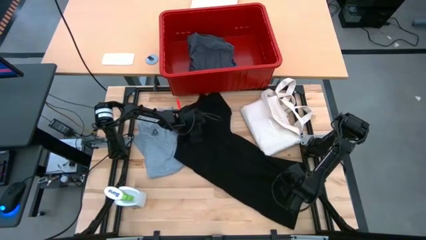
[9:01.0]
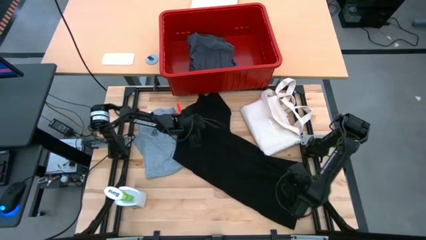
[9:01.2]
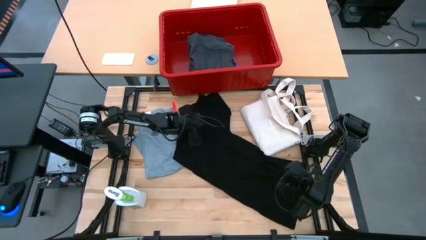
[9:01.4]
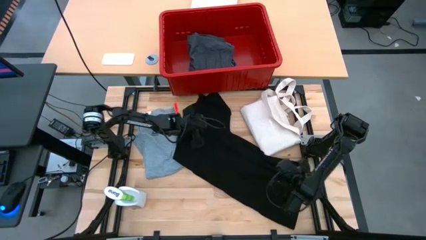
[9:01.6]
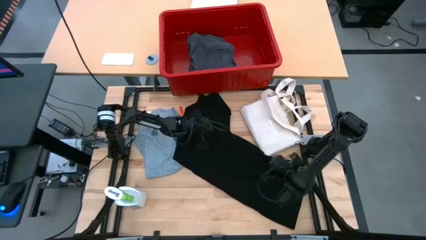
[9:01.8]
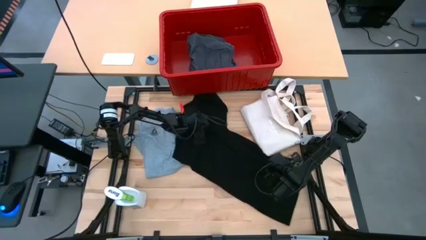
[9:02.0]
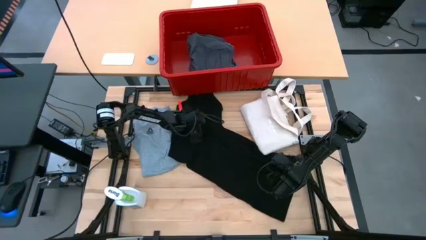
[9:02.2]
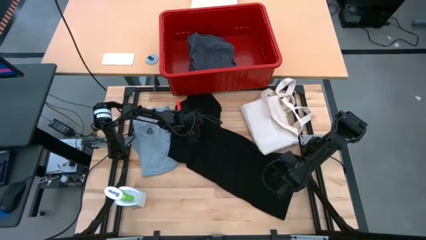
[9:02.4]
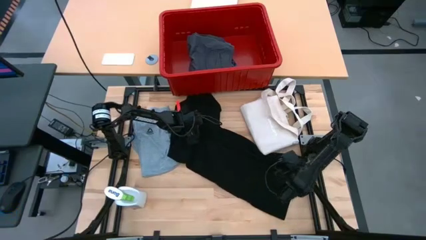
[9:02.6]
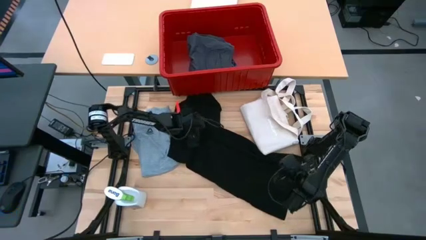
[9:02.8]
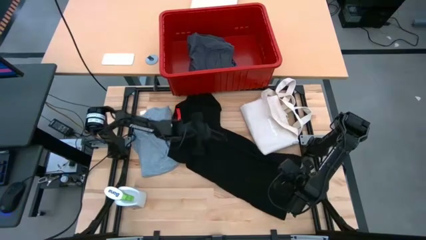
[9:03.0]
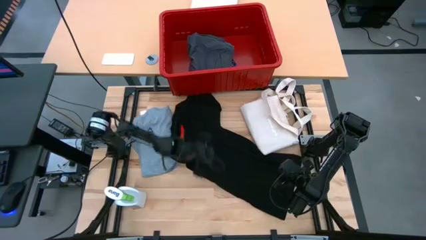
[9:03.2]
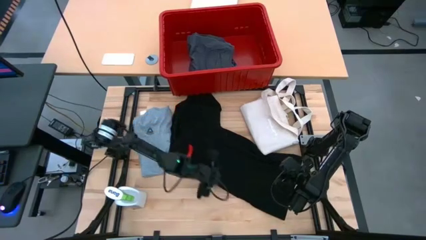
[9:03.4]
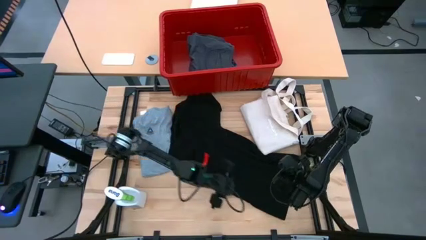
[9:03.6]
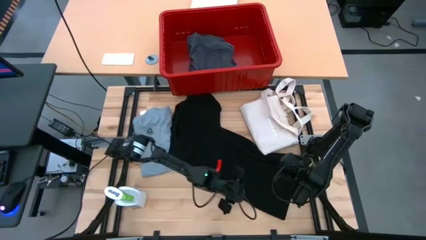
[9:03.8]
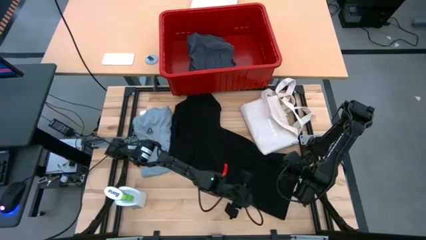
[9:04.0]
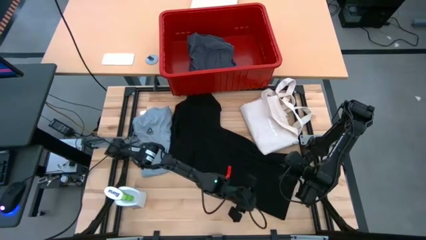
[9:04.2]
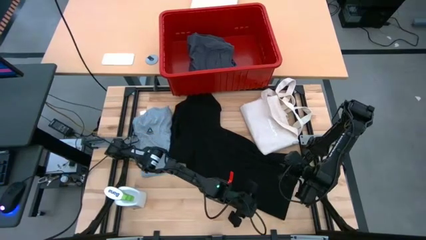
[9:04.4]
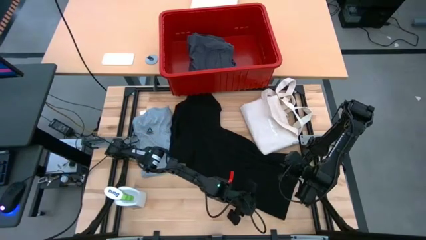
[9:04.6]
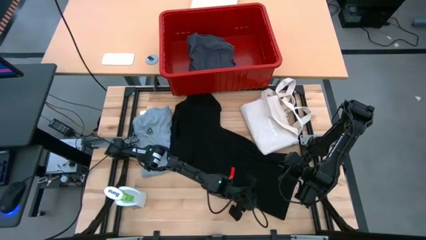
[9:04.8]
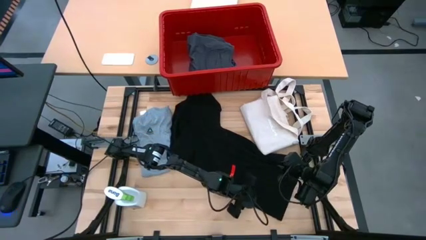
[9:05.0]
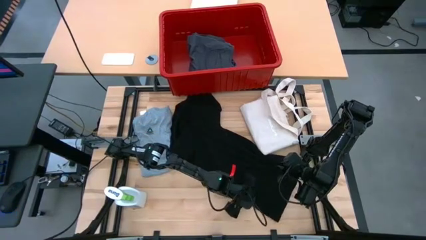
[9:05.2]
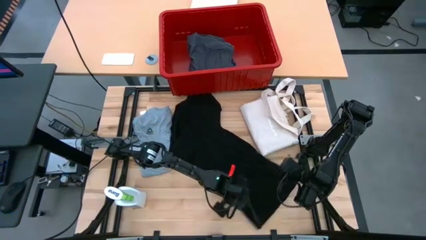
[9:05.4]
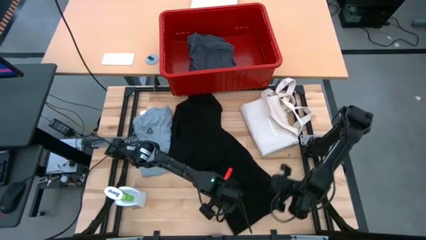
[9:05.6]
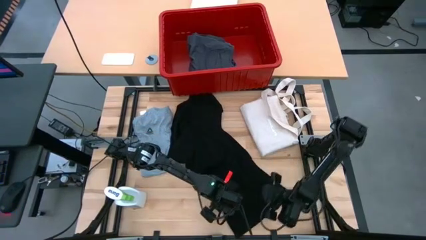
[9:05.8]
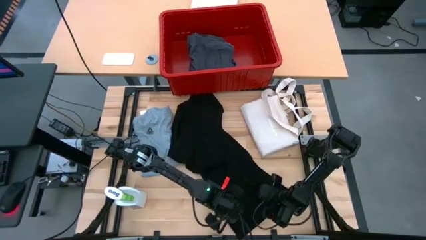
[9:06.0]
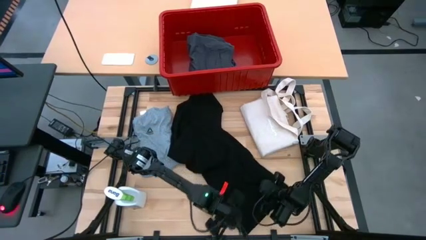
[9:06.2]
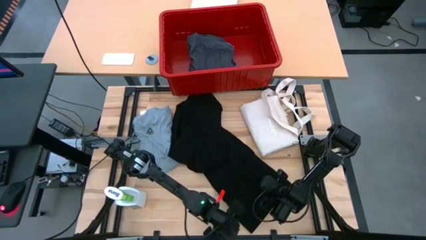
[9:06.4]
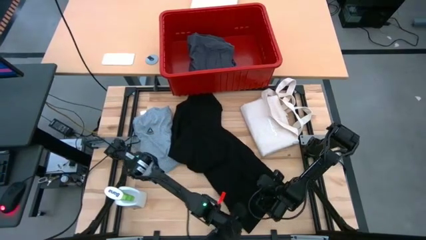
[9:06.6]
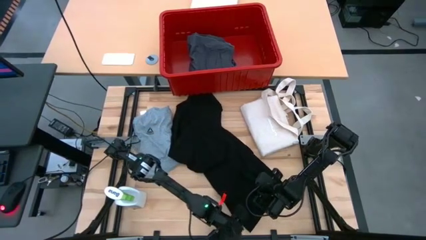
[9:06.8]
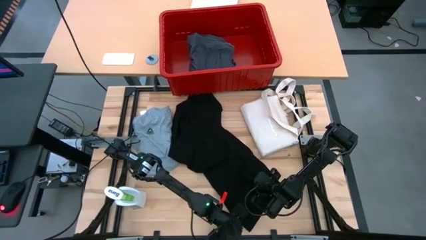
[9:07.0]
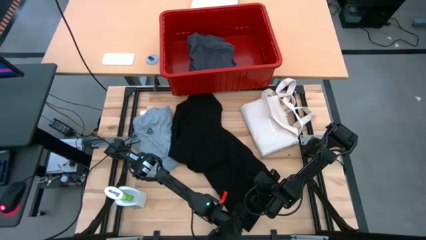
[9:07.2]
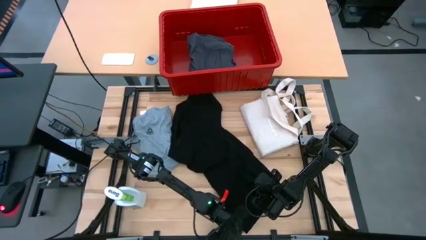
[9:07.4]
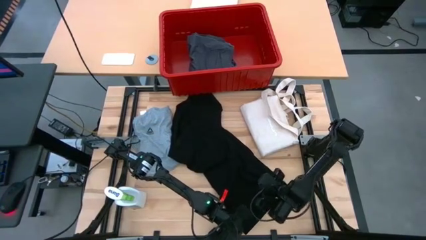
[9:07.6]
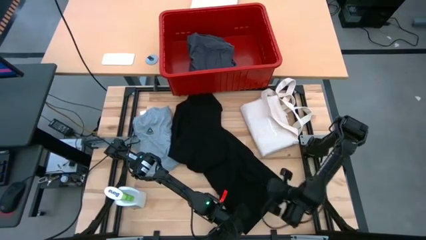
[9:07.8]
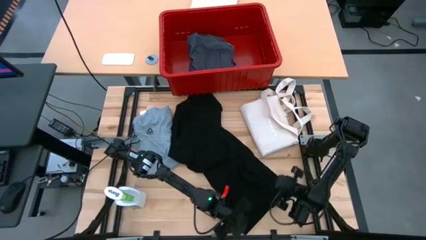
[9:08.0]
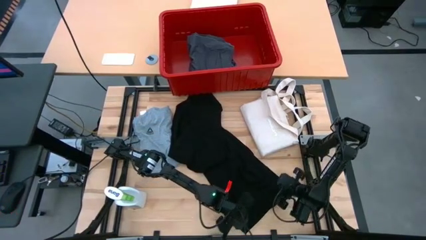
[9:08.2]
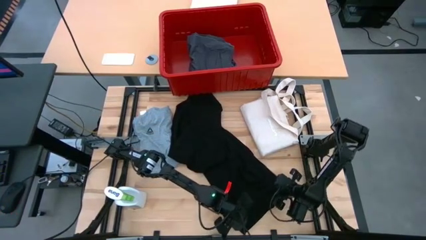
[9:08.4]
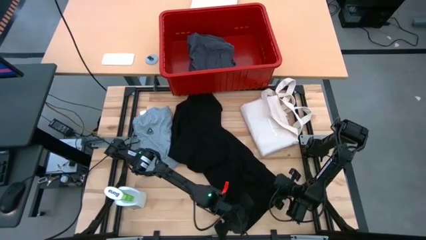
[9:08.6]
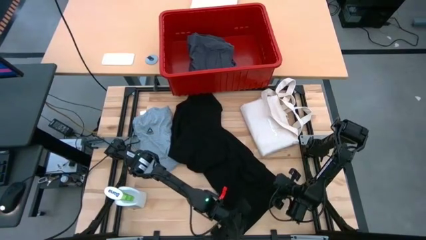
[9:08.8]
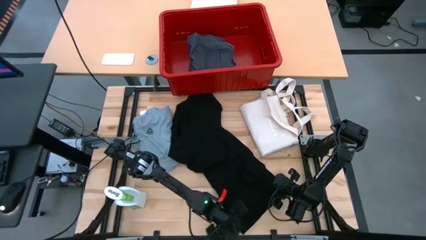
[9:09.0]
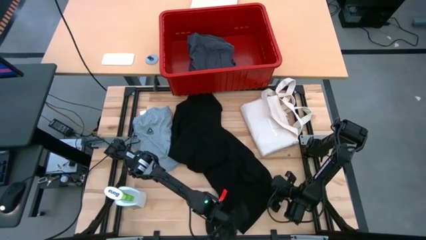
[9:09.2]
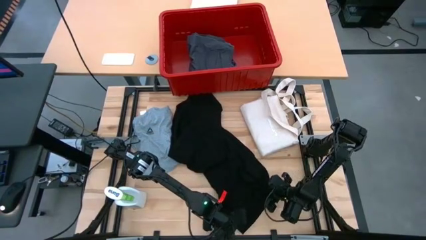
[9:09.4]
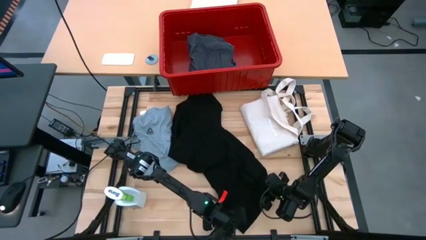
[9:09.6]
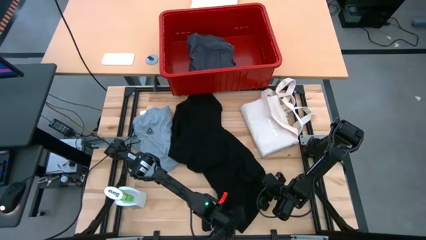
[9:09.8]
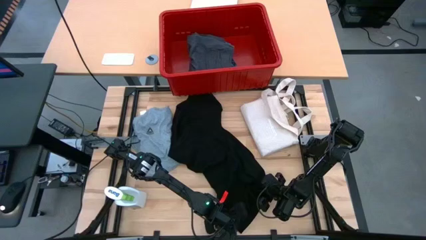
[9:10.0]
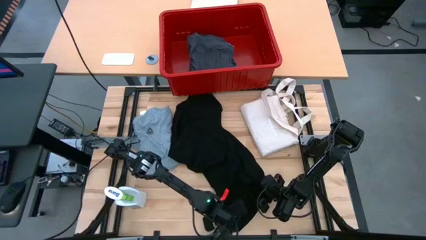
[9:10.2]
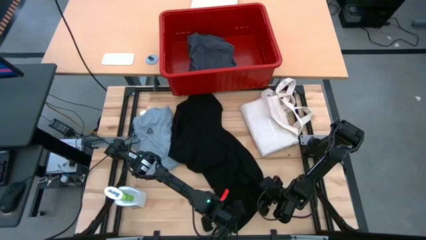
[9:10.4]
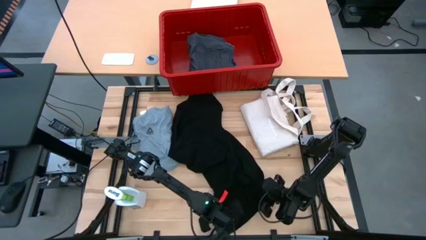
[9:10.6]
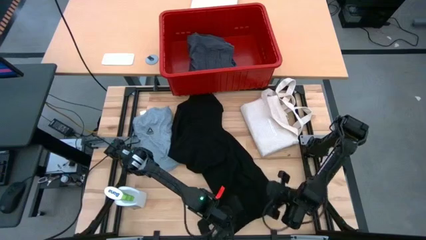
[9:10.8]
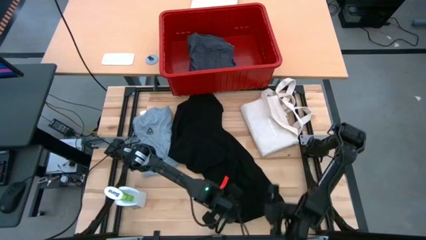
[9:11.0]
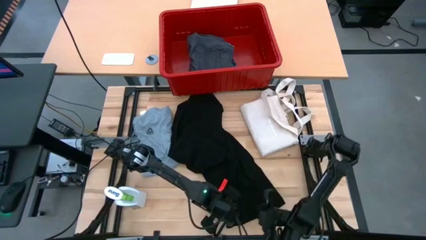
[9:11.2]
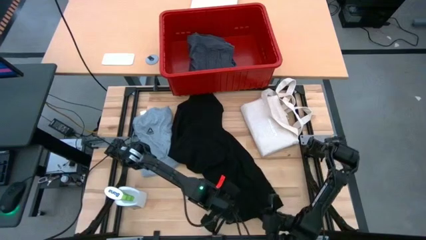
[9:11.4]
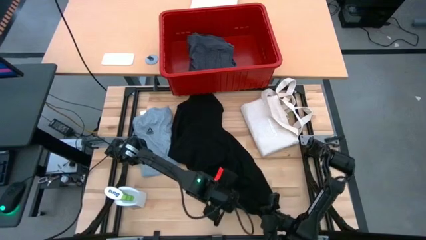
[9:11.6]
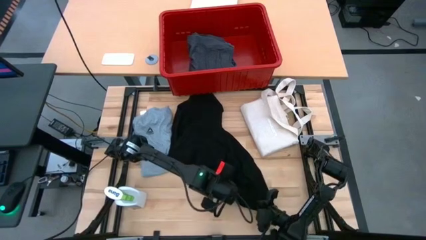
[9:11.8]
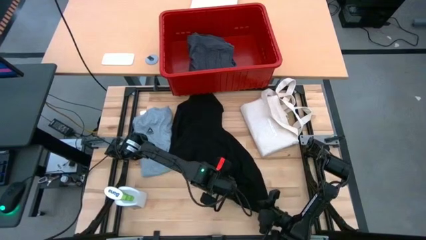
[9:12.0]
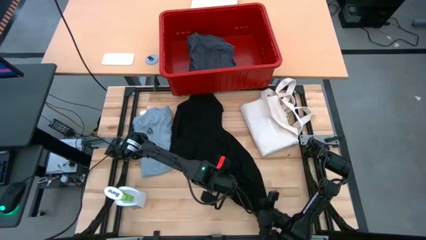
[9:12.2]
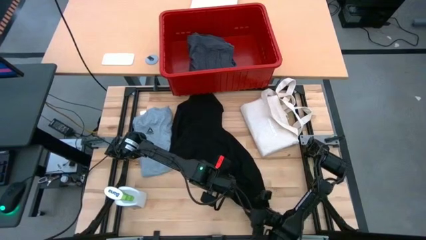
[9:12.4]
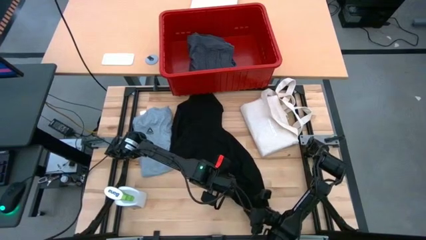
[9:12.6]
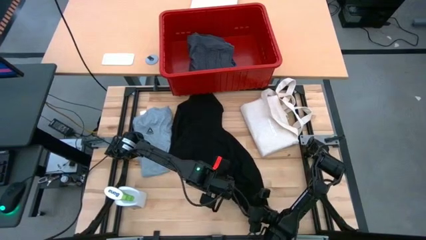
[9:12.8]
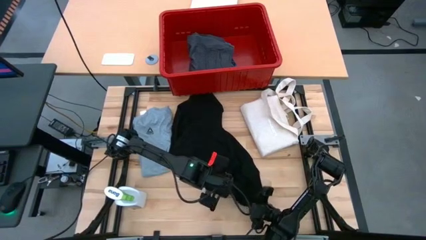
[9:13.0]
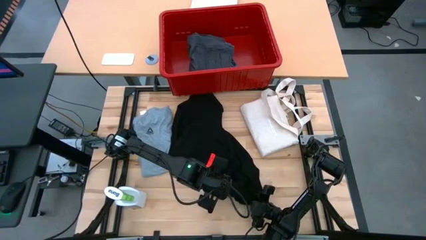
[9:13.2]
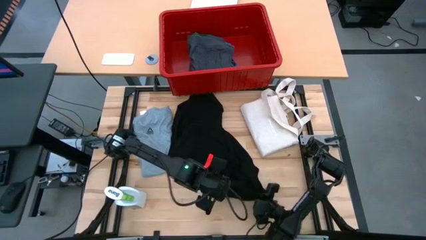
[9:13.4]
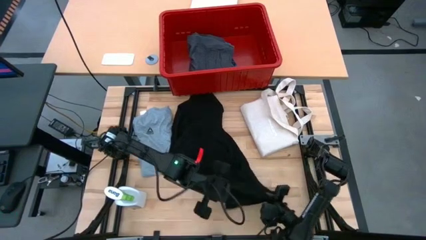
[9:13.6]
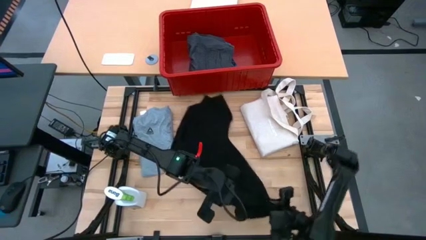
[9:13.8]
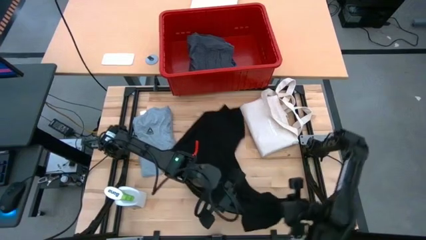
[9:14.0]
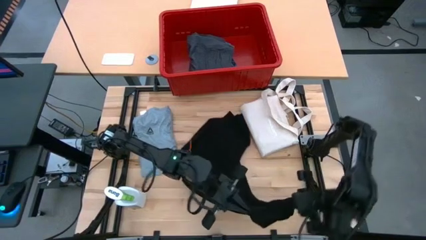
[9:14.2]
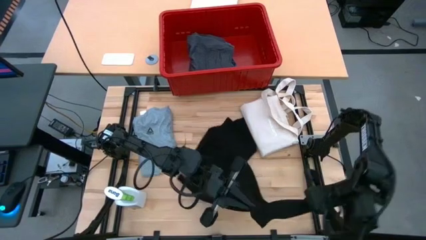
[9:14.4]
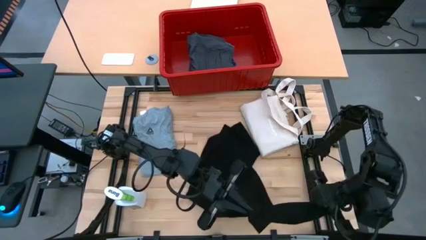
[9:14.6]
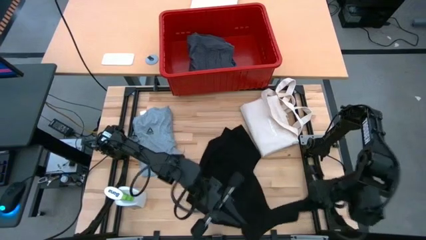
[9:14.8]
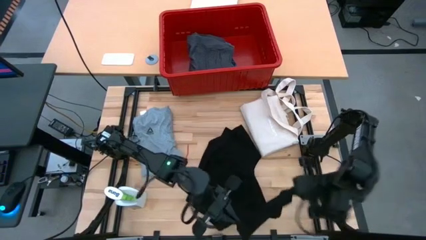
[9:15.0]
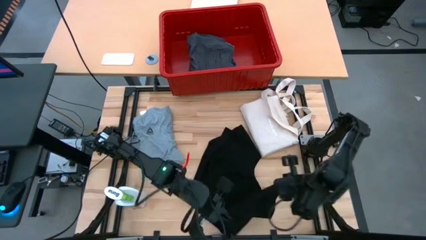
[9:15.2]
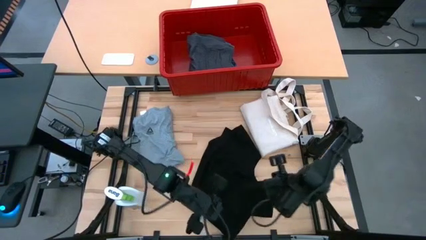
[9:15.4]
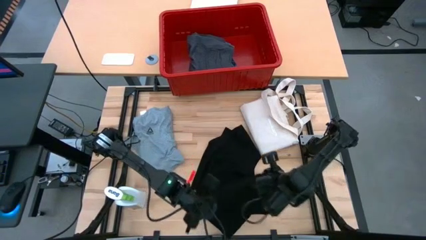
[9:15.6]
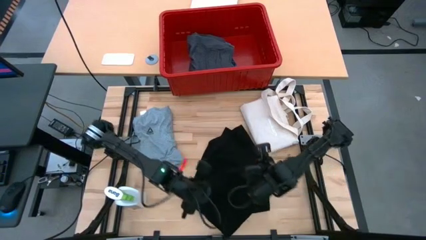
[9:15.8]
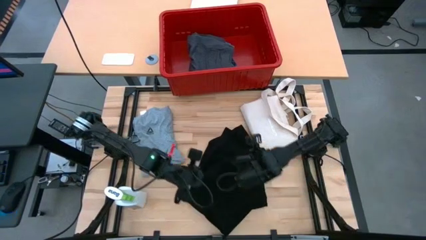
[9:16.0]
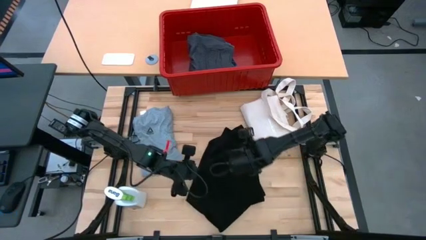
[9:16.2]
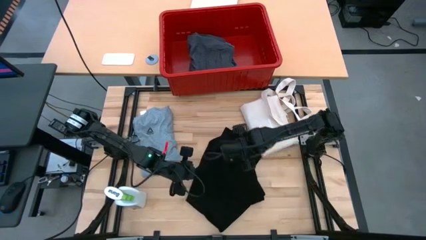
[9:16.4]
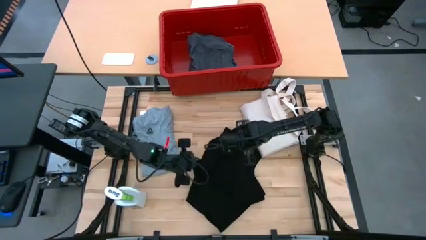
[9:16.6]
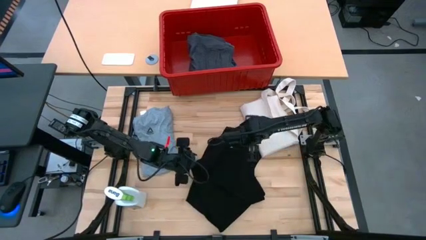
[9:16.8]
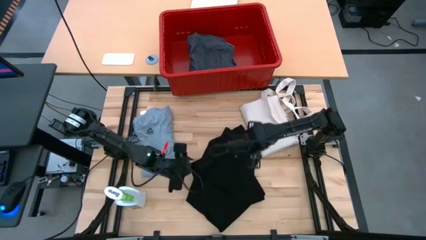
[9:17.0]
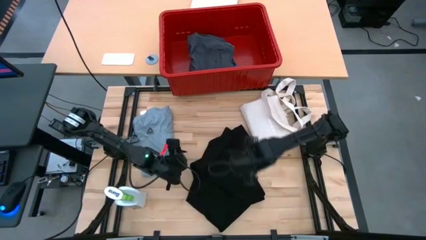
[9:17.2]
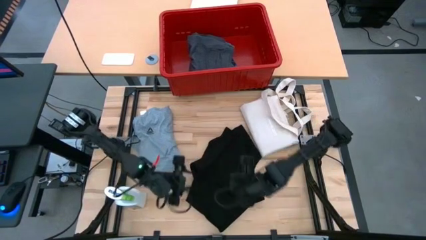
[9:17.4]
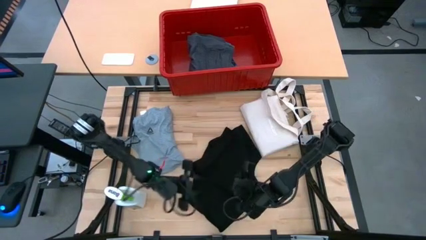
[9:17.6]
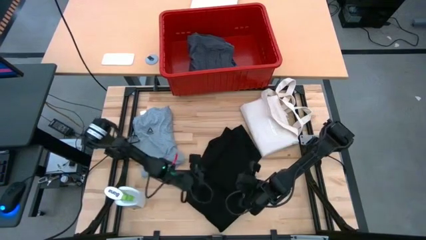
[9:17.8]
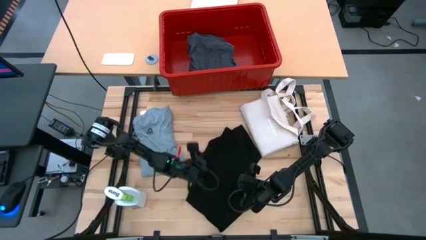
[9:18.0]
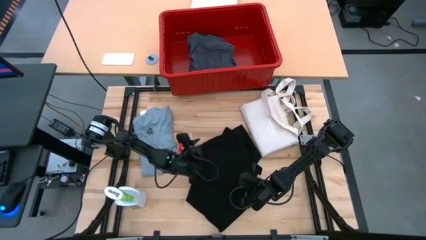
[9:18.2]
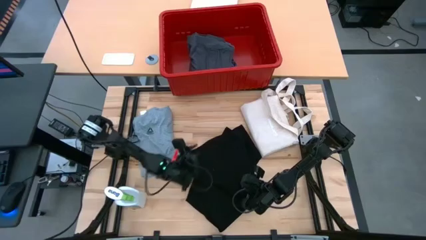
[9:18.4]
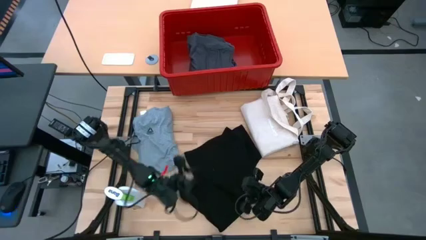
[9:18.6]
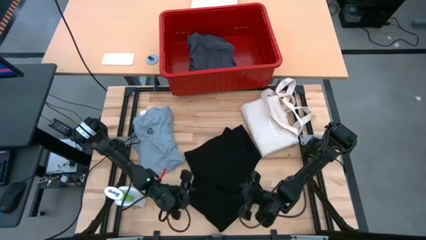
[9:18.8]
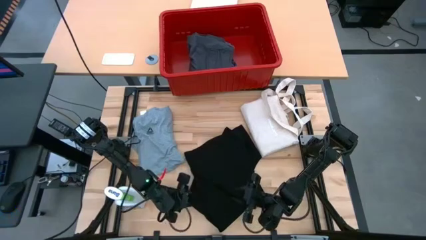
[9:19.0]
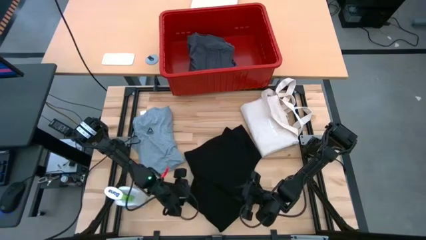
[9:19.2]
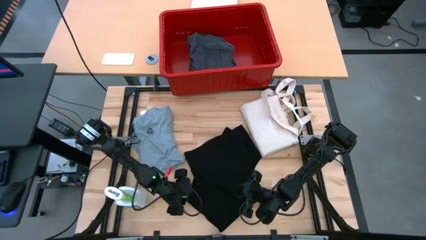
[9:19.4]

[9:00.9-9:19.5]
Task: Fold Laundry from Bin
Fold the black shirt
